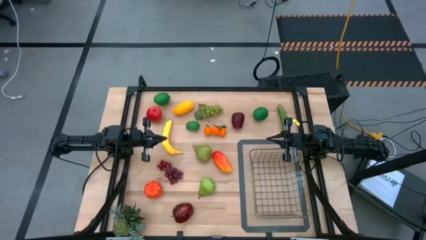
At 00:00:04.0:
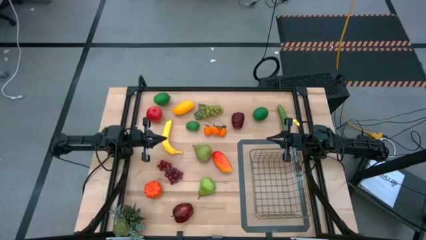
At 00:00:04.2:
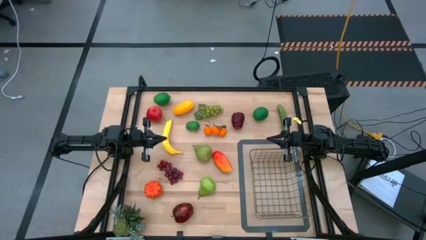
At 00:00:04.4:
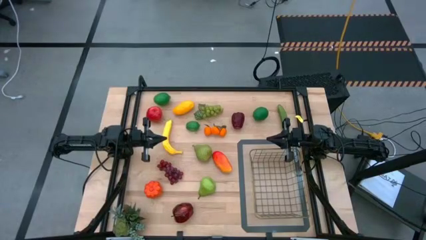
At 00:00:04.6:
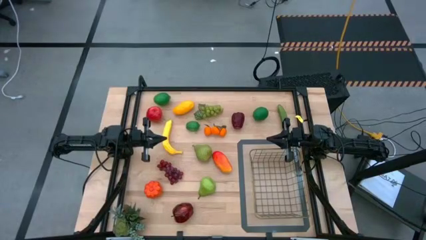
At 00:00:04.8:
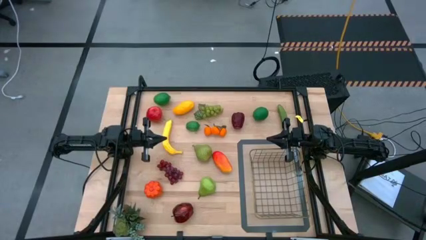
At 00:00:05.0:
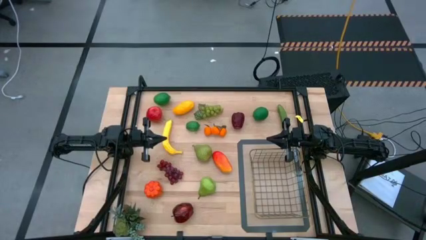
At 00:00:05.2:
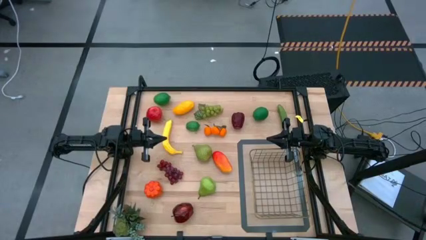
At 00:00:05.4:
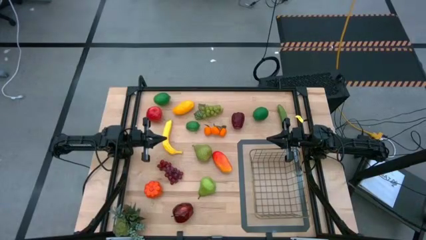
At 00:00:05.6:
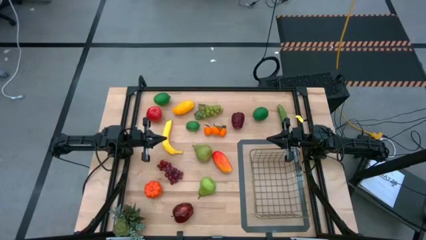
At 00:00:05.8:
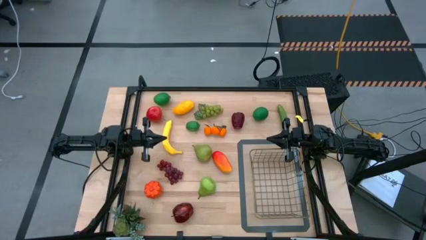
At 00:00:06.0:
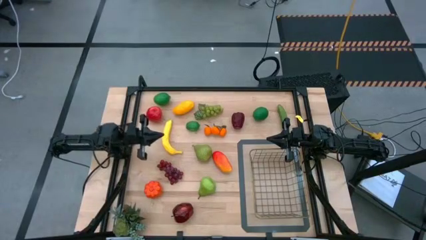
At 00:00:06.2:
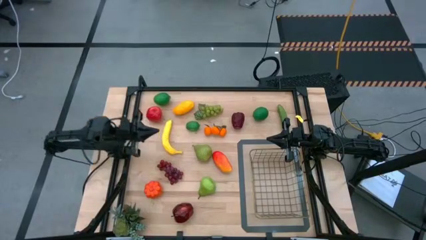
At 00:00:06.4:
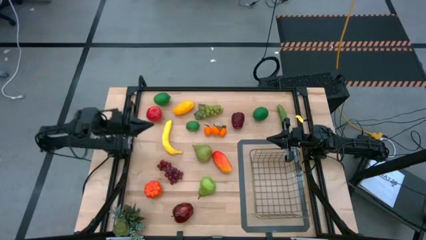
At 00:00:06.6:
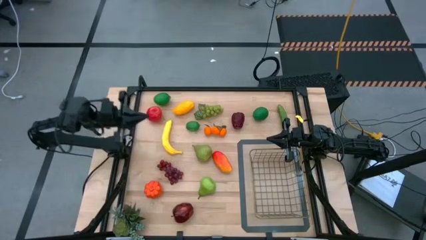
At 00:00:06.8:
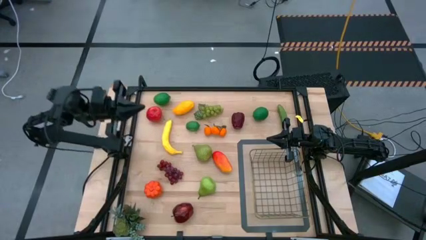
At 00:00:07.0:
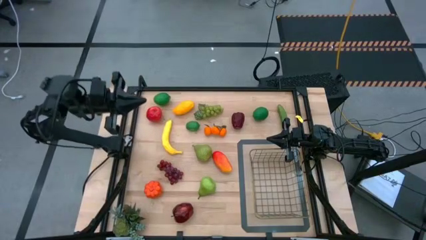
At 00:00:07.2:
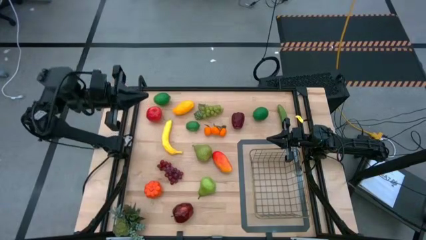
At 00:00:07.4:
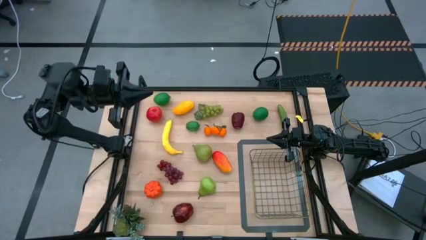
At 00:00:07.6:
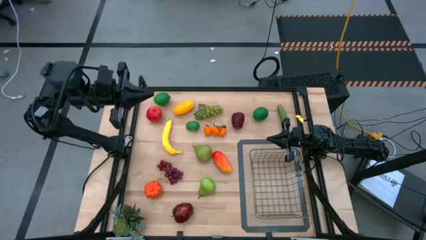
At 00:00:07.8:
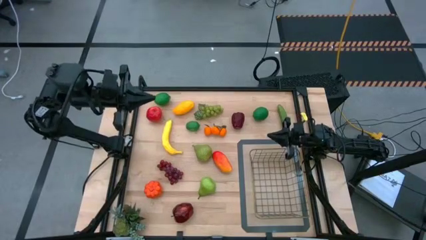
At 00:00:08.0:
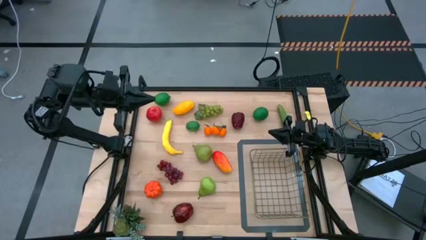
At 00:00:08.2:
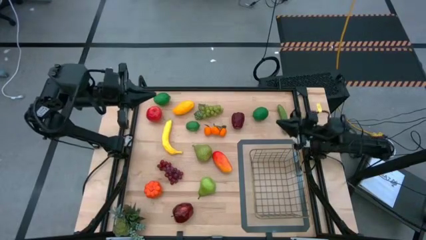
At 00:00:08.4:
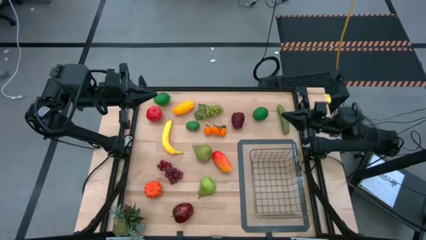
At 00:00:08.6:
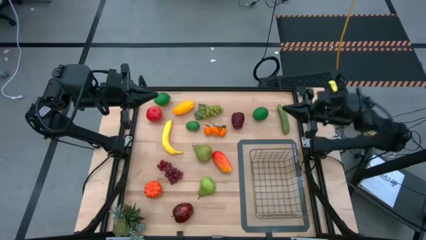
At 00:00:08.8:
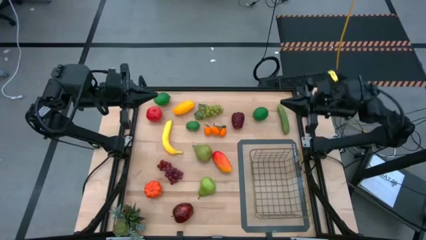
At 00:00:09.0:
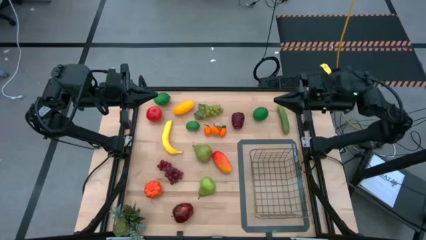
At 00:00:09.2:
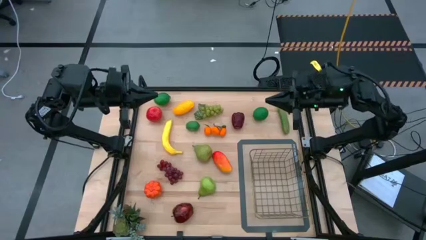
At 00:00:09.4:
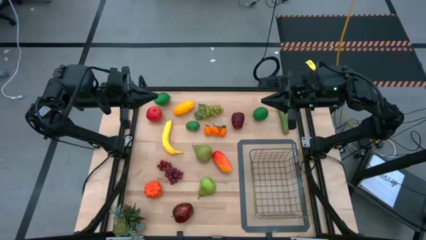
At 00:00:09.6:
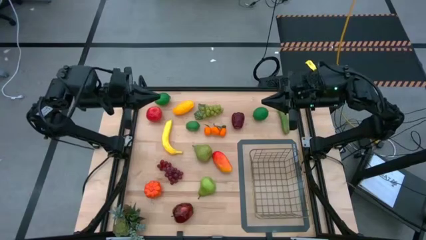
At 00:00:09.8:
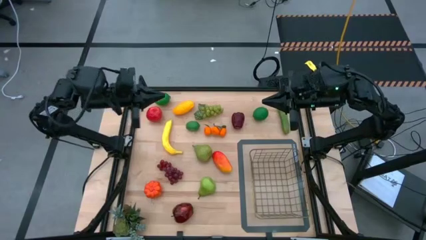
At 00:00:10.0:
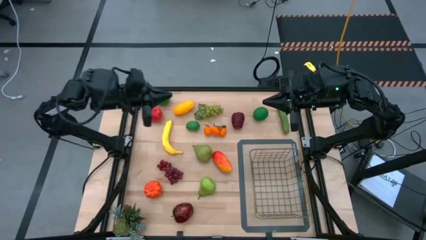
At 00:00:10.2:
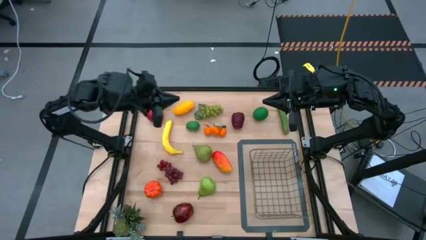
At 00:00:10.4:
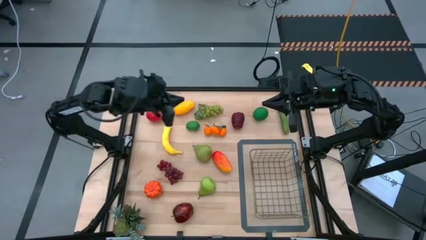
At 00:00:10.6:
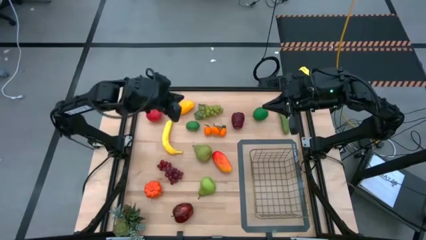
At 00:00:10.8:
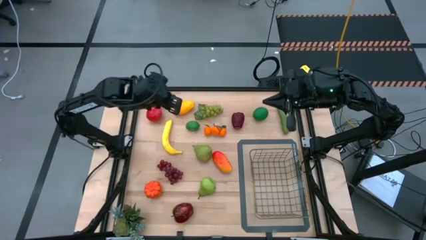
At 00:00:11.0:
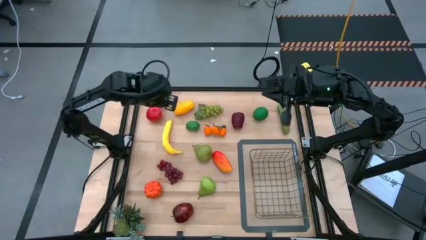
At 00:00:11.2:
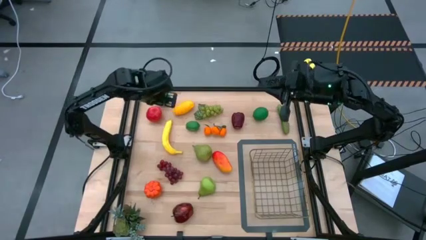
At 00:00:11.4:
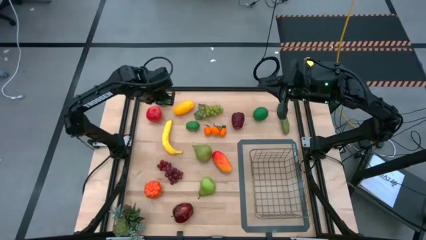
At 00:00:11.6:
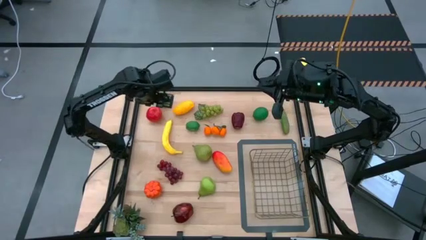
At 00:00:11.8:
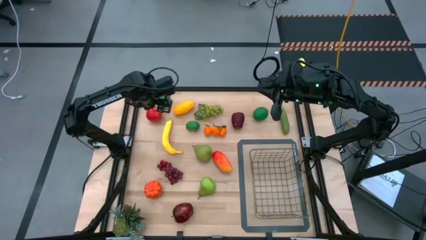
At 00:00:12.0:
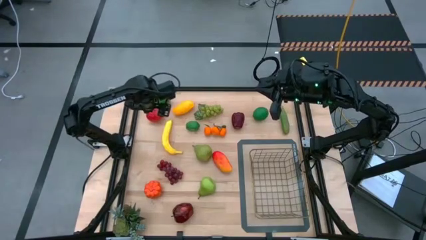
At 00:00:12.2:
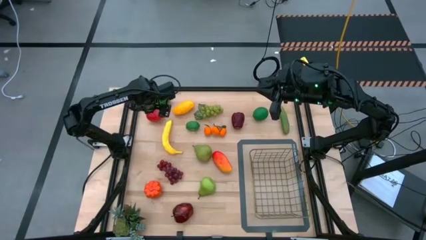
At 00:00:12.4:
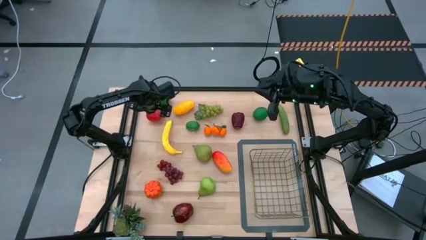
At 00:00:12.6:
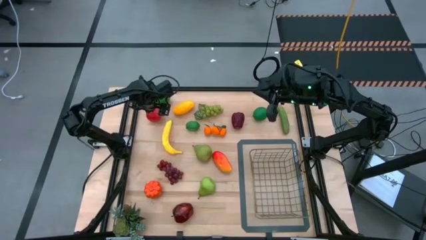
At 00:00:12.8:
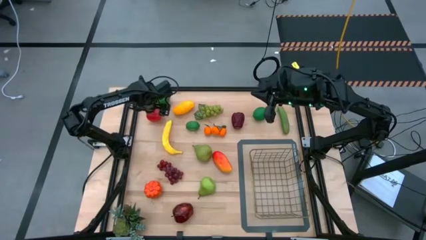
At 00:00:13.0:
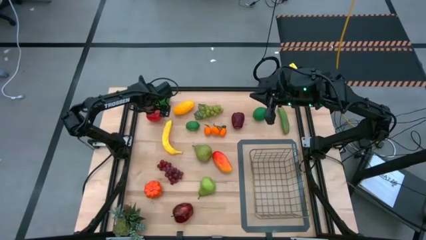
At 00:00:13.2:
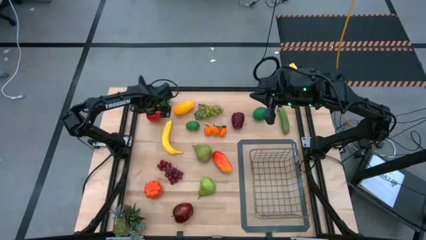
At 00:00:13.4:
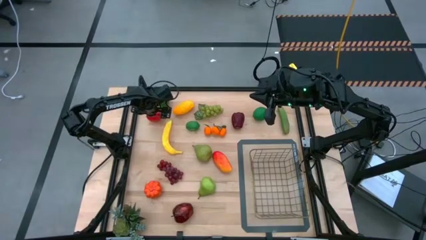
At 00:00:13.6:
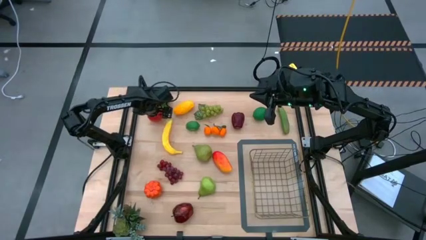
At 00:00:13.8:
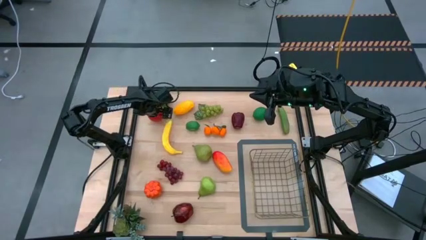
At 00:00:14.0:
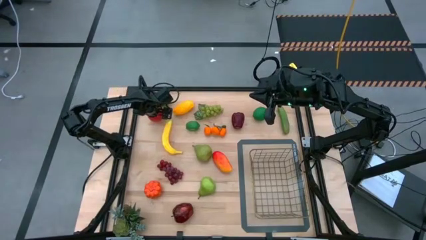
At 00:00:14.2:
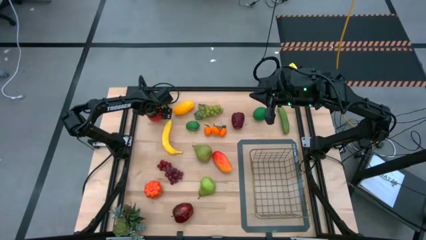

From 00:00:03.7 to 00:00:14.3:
Task: Build produce basket
Put the red apple into the wire basket
